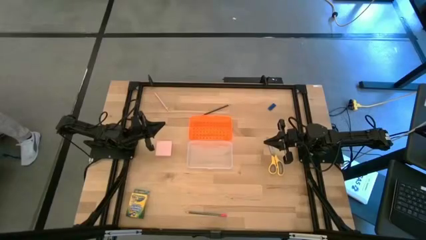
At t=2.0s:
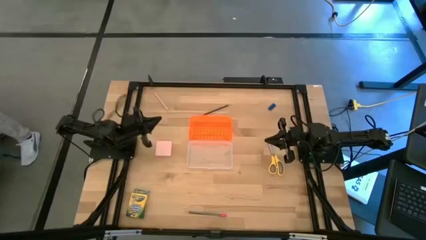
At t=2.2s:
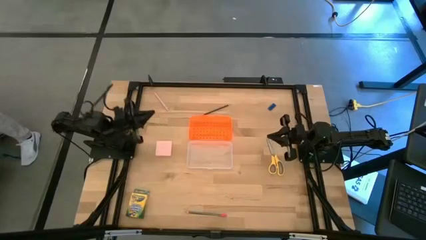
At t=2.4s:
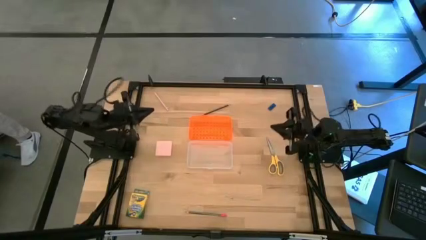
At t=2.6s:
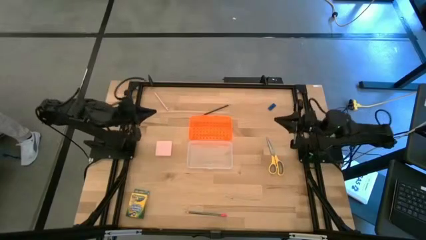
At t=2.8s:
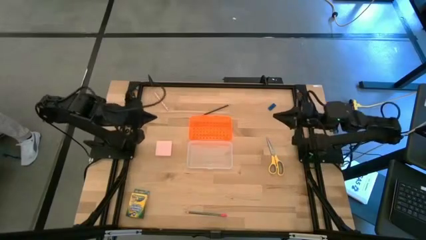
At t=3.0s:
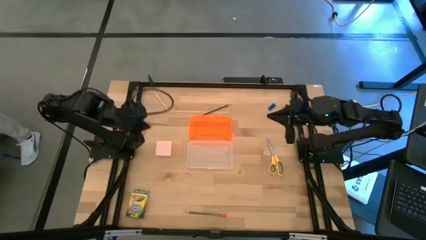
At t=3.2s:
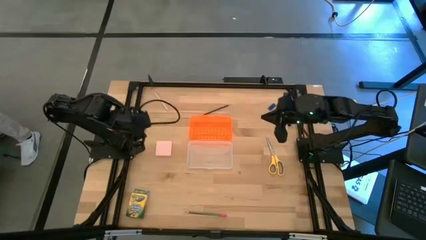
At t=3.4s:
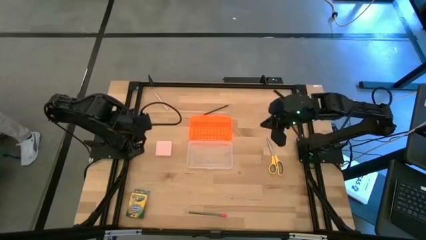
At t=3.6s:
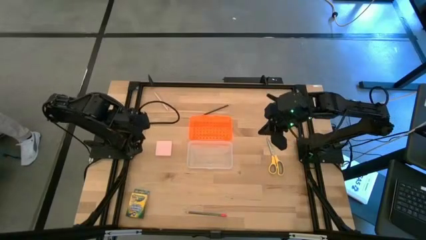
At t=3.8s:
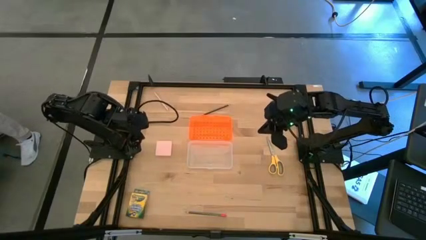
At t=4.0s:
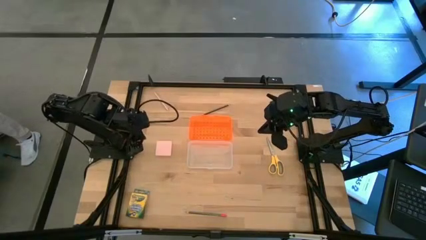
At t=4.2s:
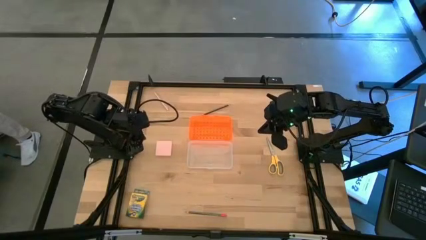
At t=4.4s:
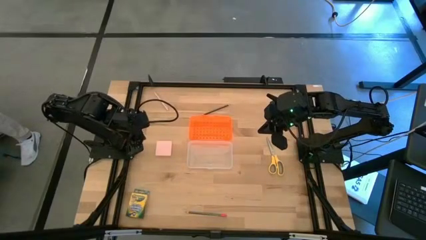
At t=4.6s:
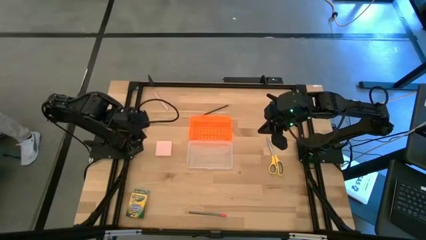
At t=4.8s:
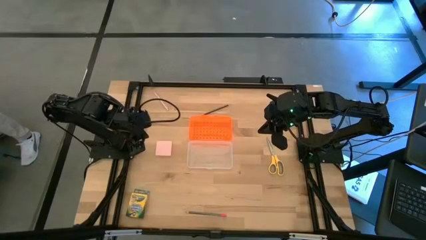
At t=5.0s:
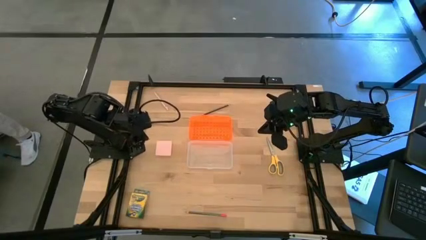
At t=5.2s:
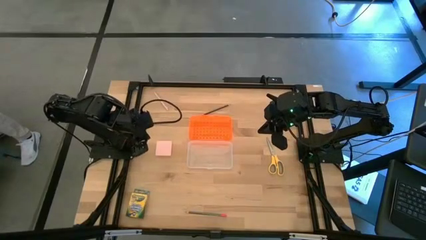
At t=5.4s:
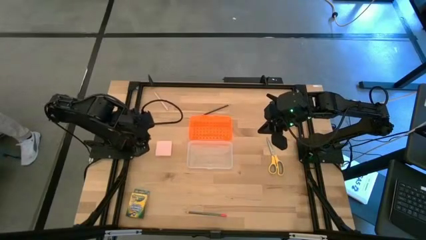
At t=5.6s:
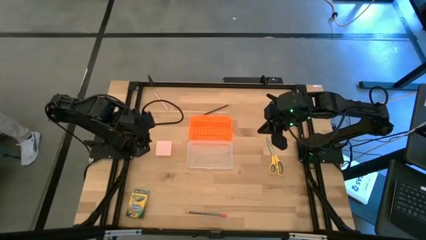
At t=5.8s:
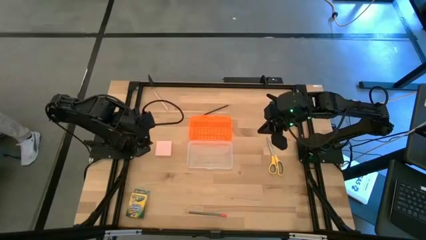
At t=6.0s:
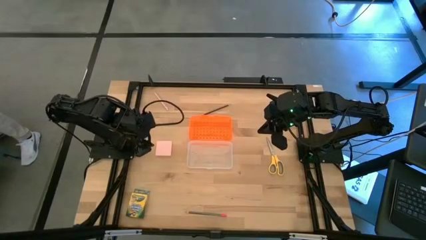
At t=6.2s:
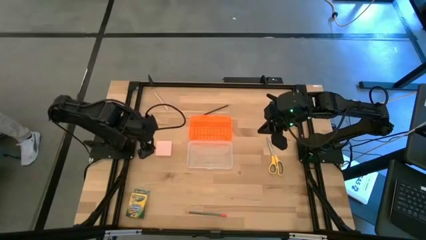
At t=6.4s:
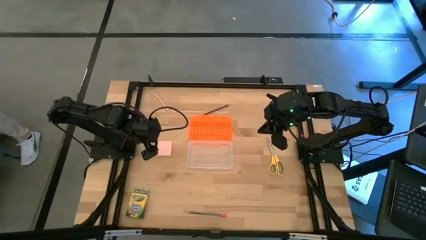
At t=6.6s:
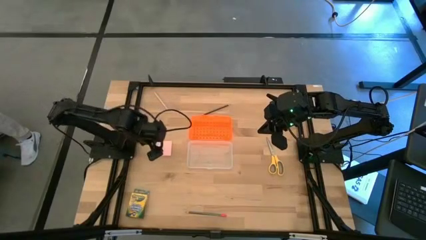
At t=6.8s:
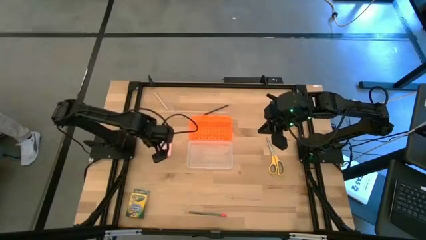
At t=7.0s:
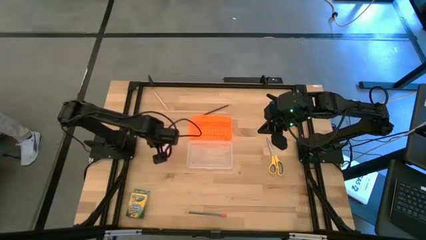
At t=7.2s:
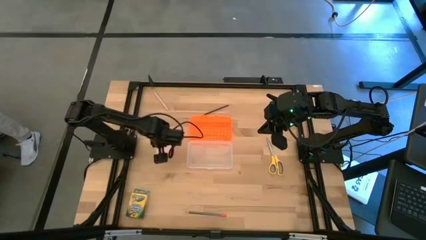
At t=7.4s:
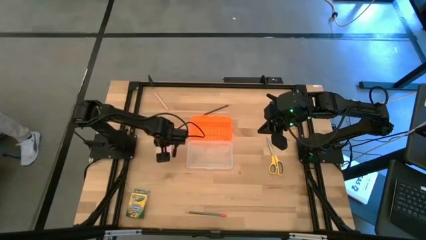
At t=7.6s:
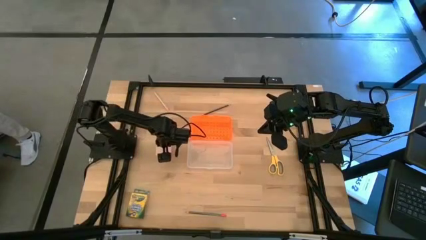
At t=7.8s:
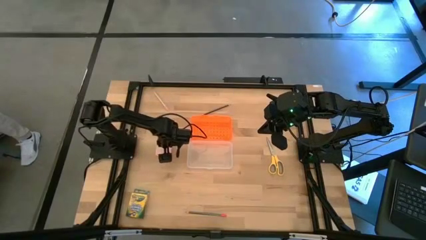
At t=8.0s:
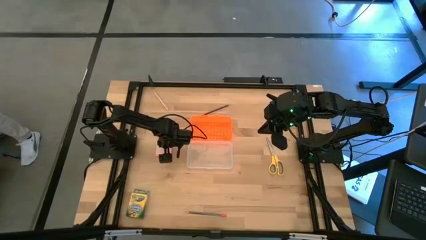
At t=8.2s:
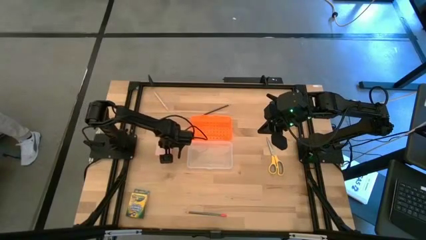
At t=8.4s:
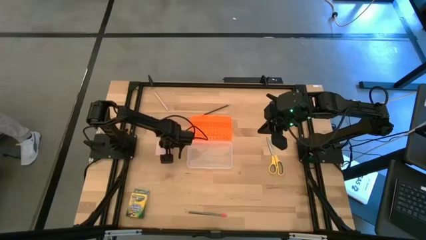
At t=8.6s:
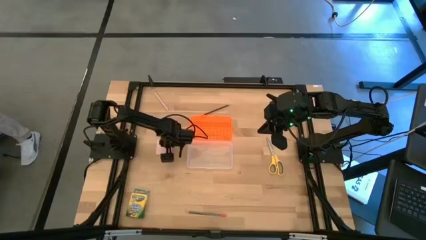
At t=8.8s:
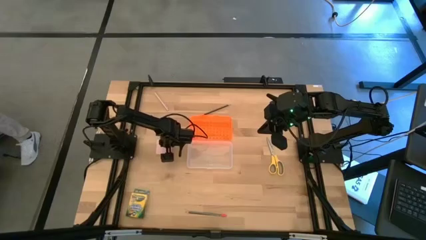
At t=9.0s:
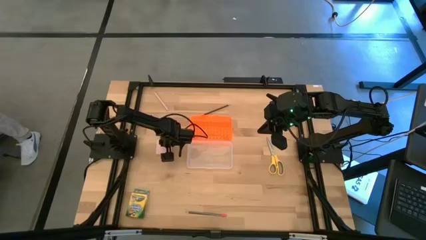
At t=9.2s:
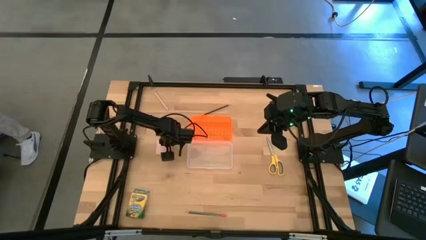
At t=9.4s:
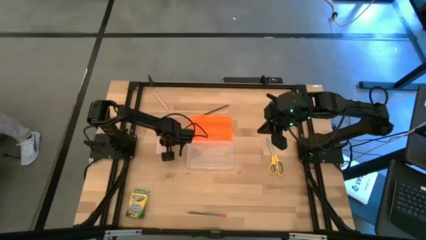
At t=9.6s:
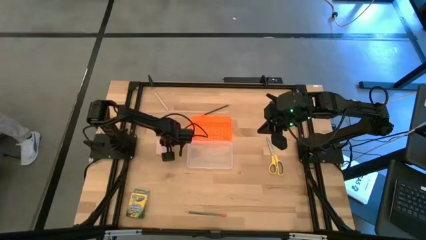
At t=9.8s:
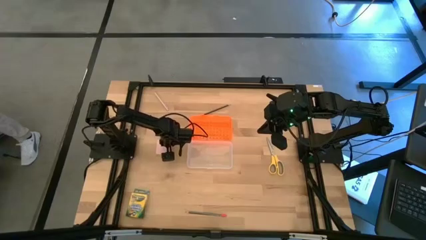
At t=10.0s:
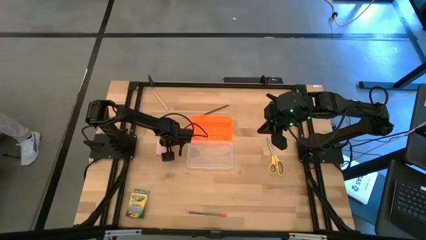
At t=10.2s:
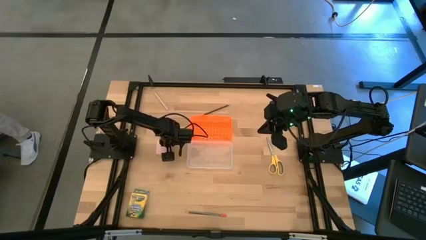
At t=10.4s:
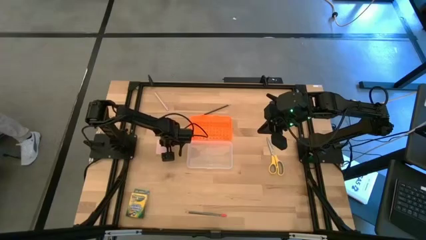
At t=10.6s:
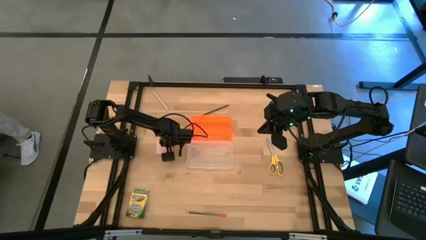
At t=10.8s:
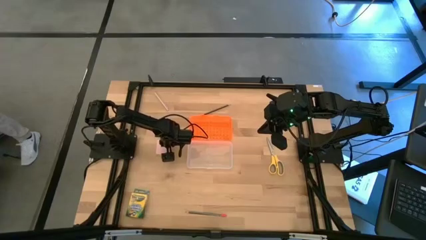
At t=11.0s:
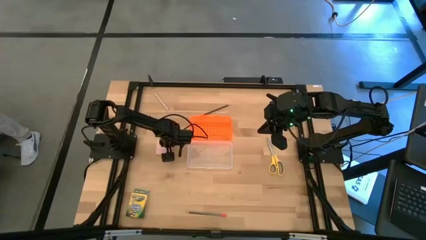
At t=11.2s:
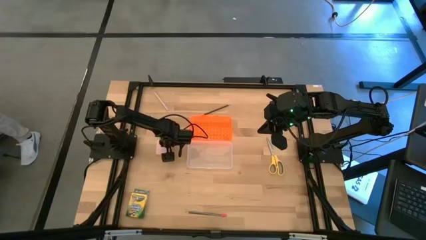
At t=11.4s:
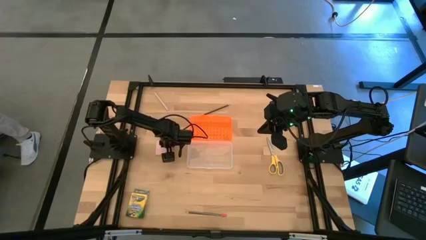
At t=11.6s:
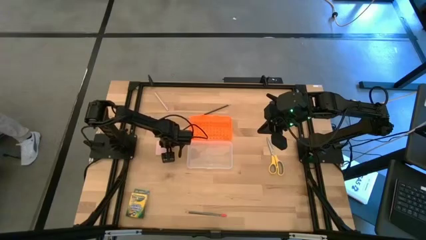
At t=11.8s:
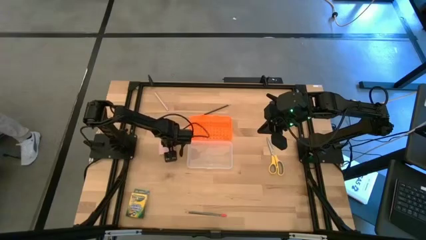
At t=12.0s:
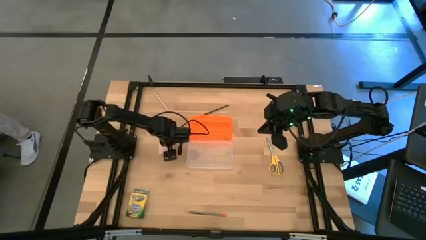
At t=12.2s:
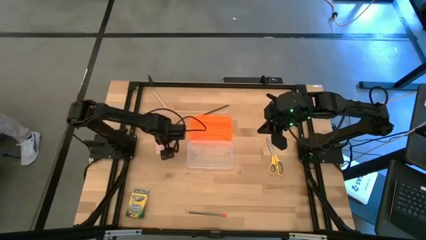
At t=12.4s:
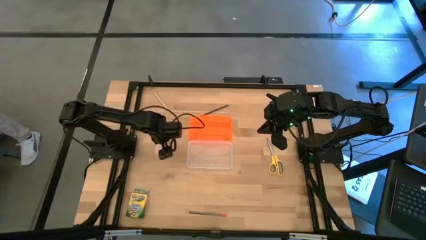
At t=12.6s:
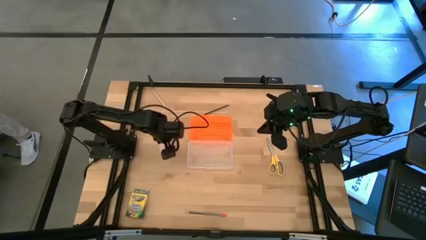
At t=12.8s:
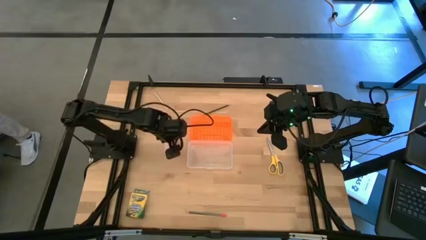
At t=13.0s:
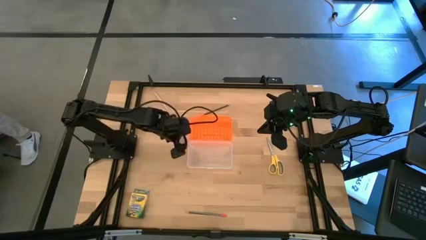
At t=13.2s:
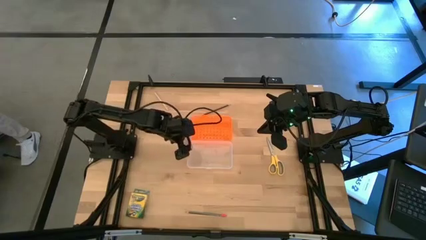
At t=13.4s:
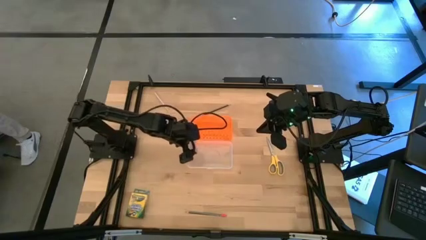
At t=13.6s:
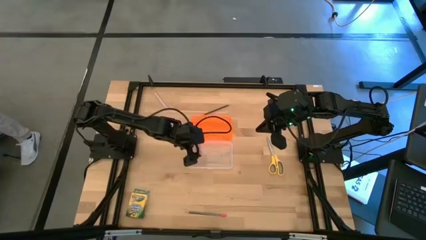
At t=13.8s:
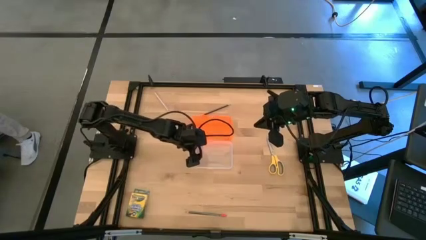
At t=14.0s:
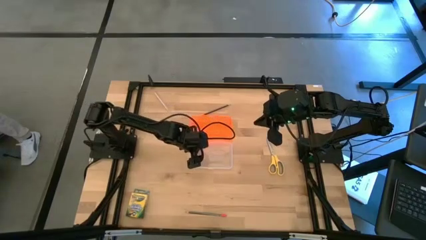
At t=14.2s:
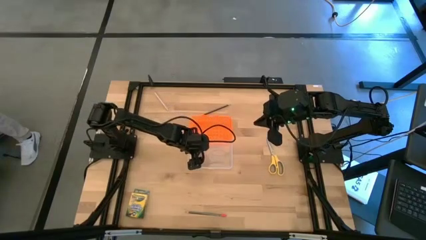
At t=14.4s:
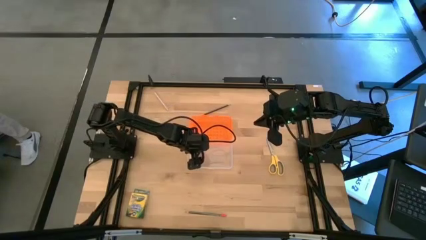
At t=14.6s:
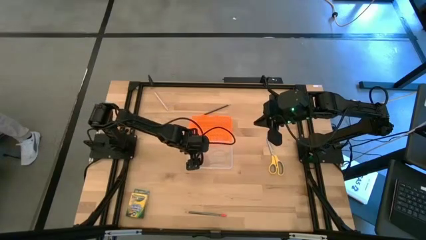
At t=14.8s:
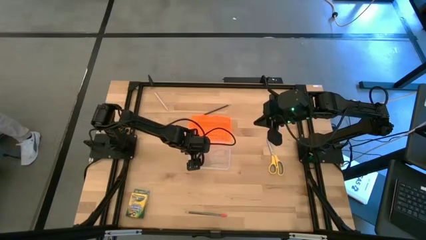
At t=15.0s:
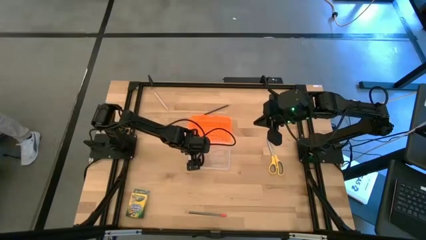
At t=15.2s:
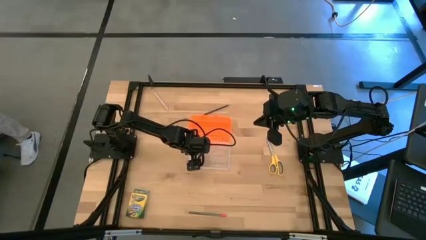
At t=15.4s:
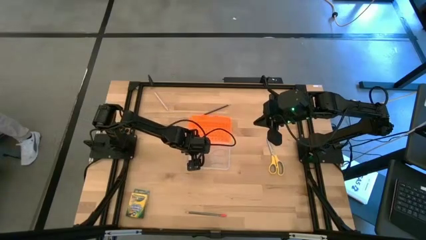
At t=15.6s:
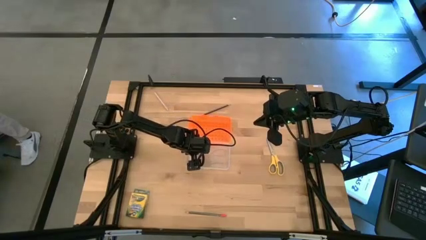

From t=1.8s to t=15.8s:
Task: Pack school essentials
Put the pink sticky notes into the supply box
